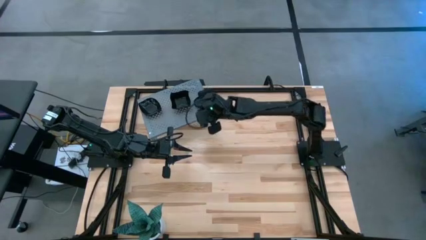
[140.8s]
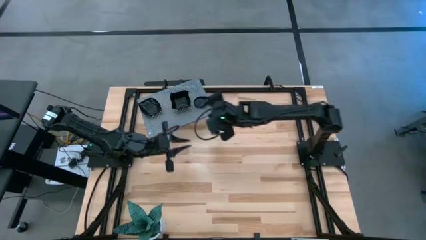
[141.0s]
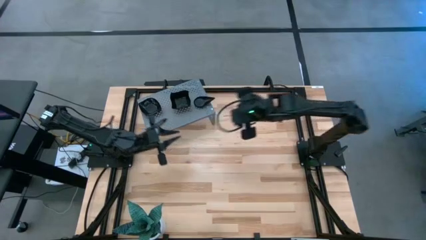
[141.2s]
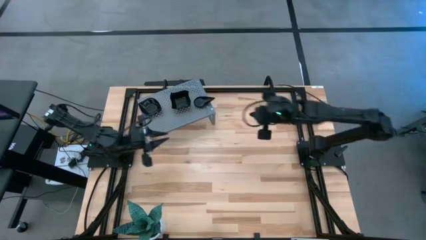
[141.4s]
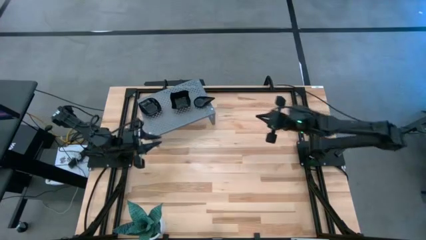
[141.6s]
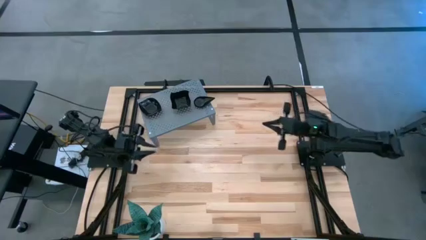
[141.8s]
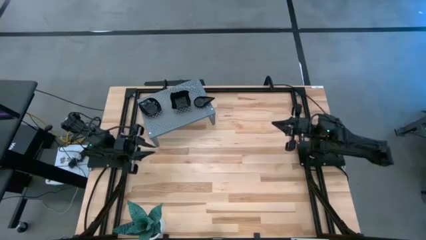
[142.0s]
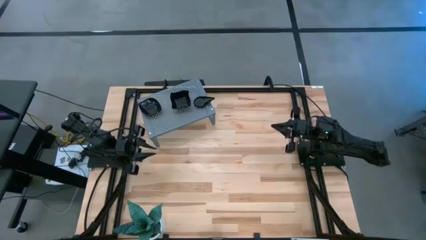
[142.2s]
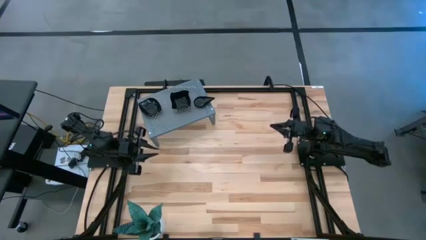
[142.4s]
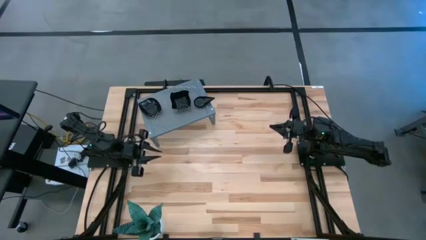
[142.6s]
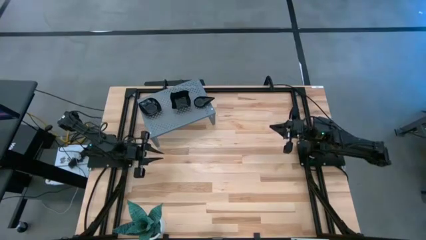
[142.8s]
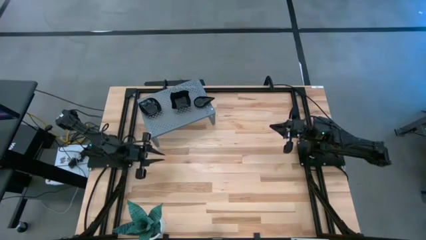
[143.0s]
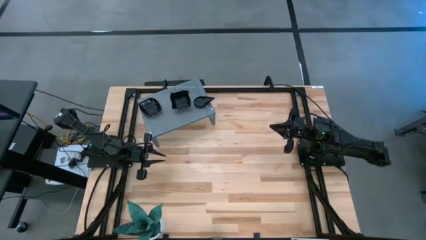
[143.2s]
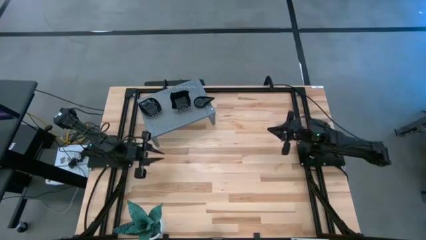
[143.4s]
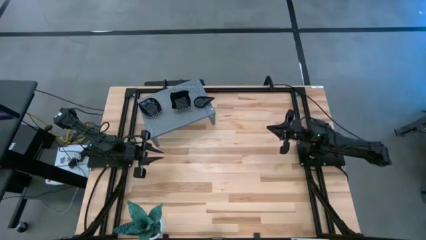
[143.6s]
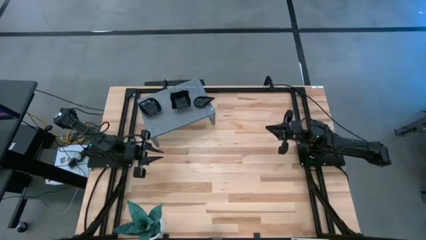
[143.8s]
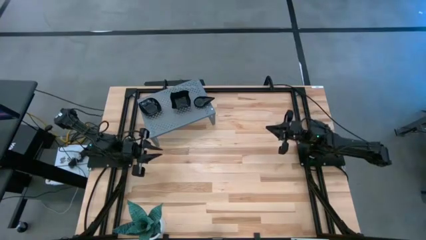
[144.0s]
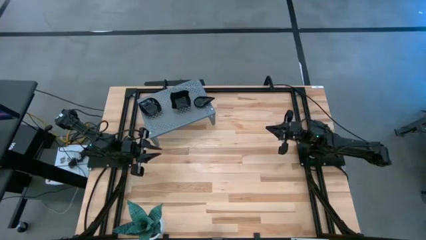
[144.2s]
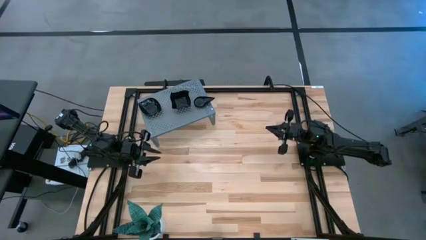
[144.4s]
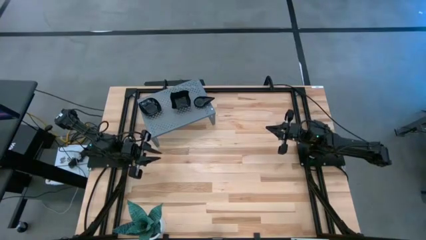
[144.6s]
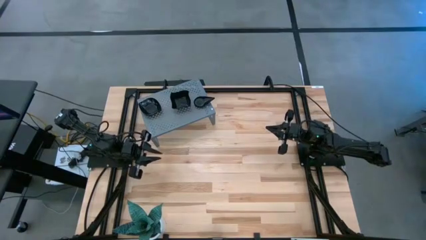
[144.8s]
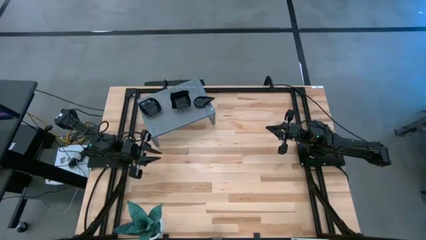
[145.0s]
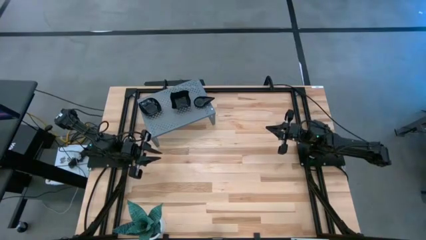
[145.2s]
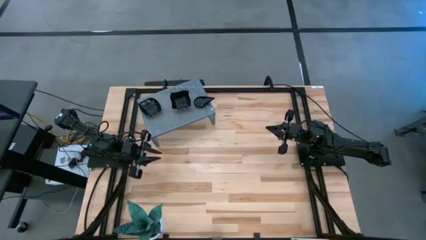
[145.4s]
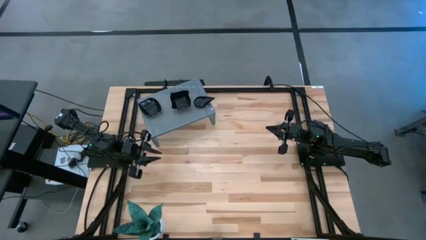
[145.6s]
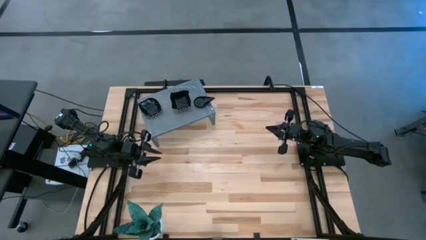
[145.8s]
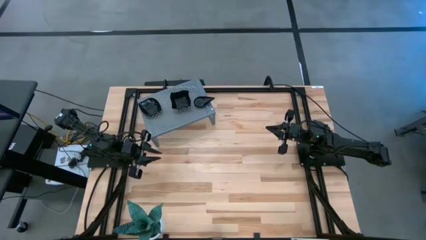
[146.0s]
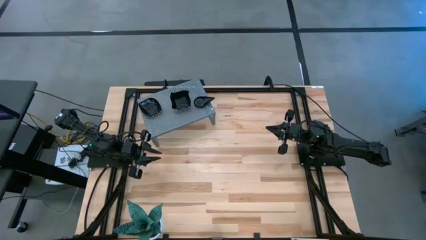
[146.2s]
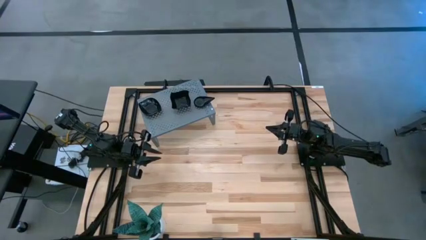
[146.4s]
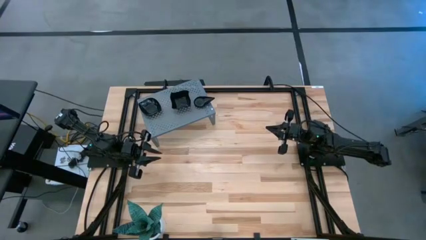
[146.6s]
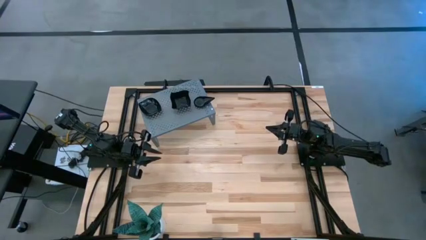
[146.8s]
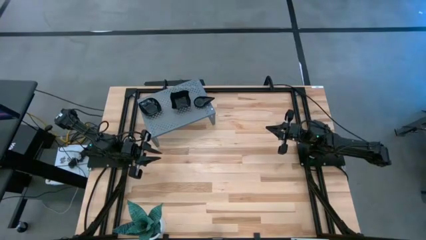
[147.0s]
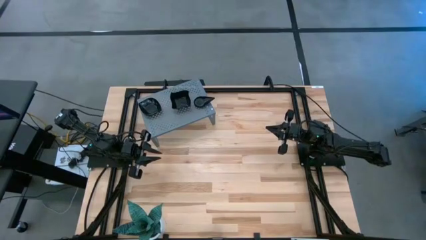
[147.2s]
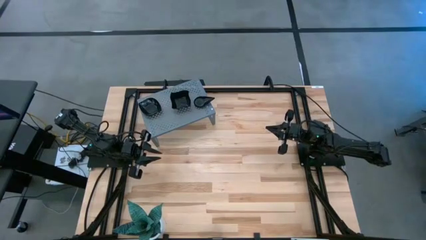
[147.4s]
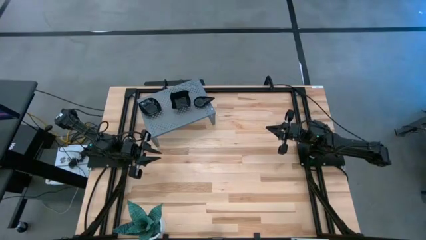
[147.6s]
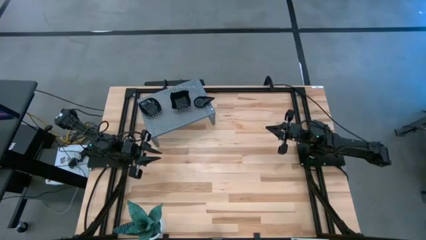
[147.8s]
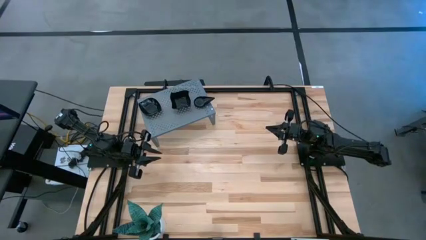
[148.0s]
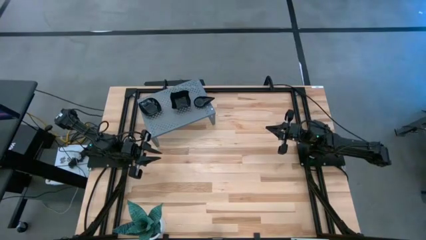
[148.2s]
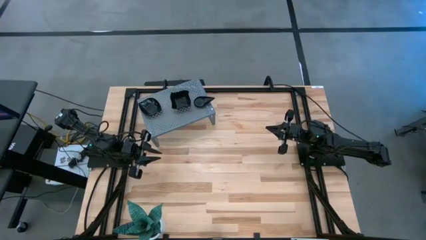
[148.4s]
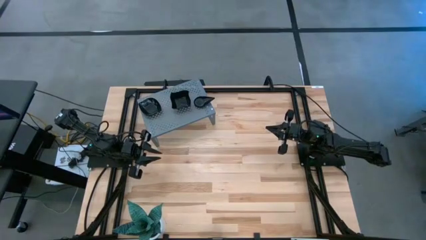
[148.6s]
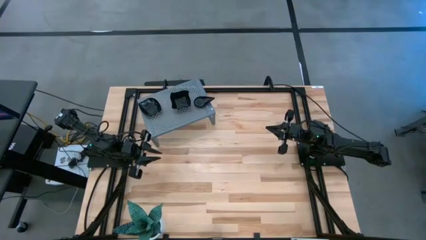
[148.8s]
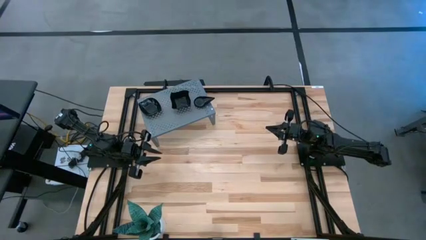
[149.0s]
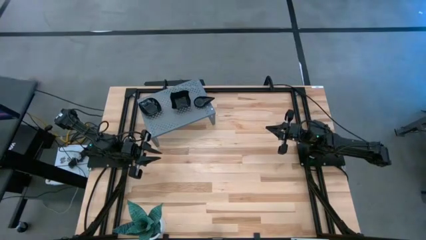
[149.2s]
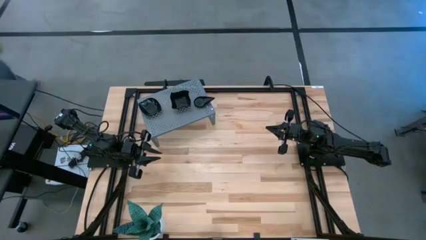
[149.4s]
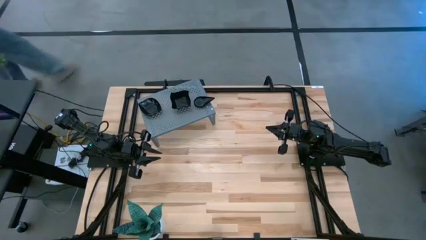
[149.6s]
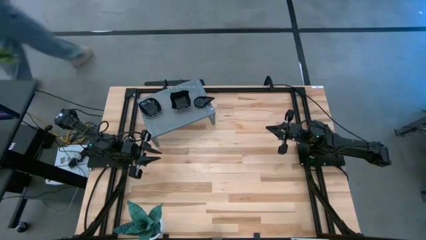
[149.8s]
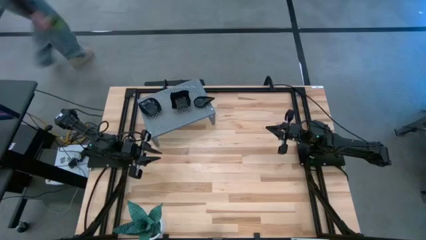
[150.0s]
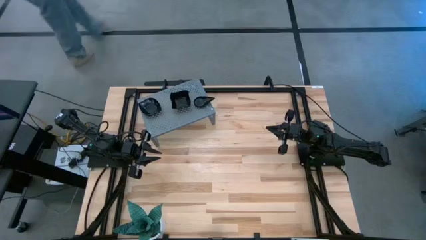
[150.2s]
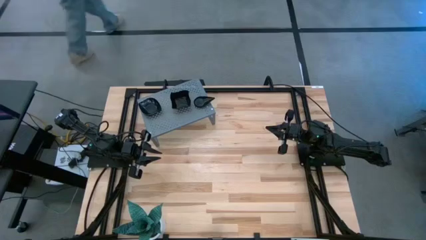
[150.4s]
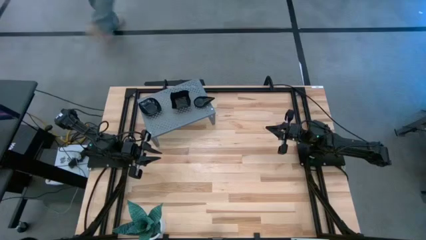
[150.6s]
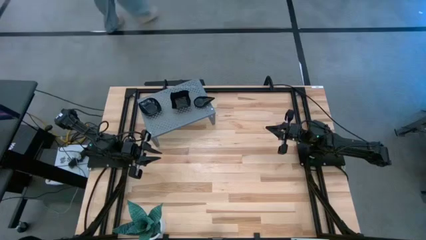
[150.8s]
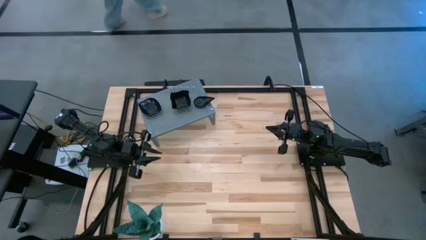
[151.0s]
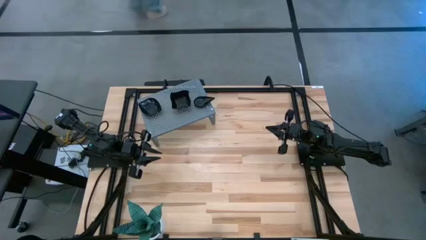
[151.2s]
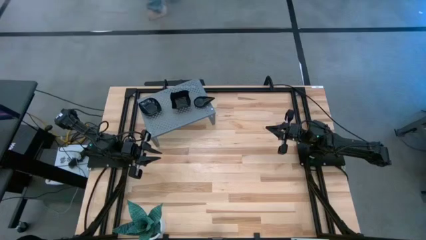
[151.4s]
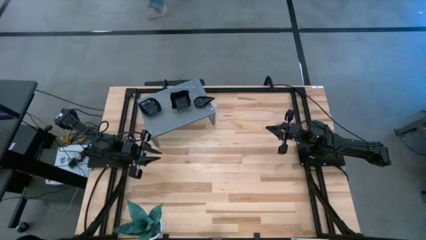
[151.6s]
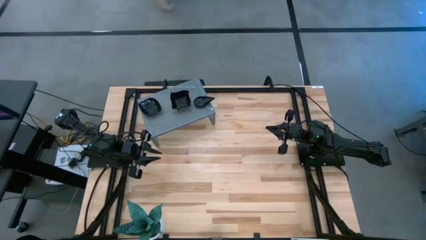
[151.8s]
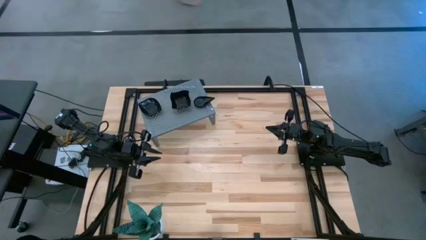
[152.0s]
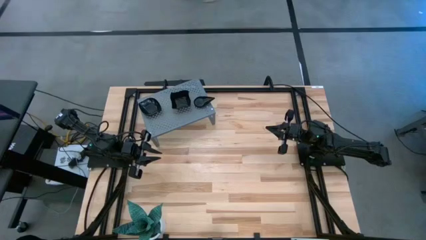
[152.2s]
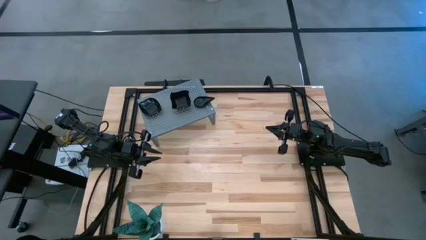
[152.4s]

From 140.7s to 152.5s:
Task: Pick & Place Mini shaped plates
Return to Home Position

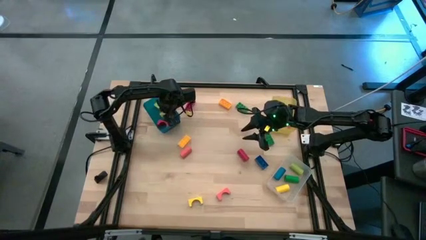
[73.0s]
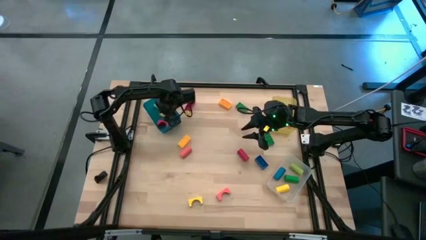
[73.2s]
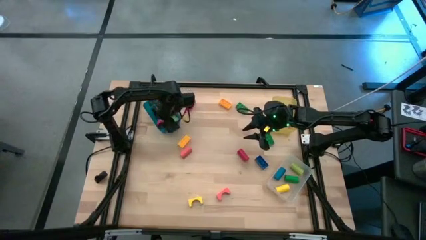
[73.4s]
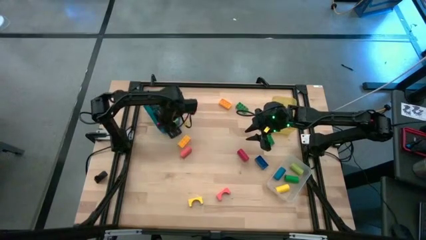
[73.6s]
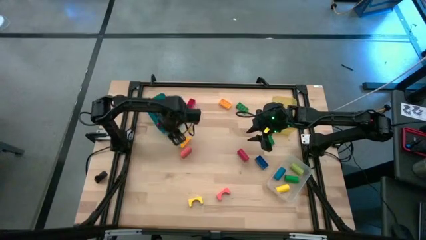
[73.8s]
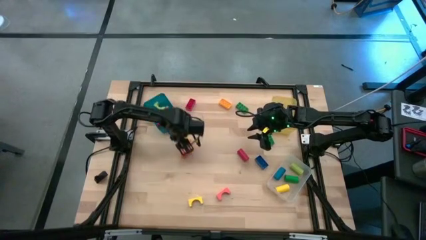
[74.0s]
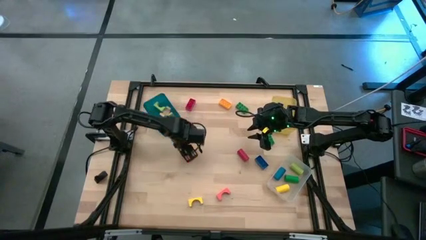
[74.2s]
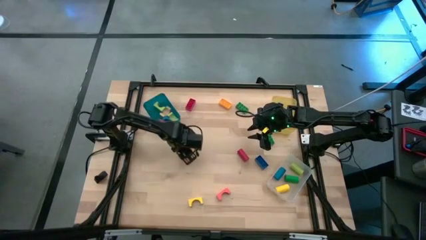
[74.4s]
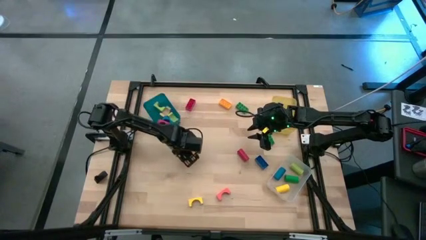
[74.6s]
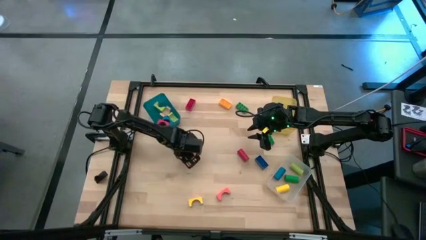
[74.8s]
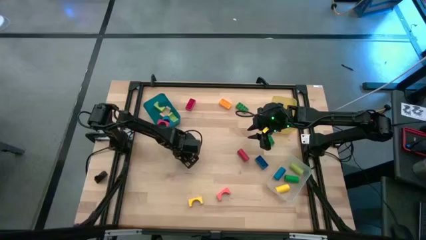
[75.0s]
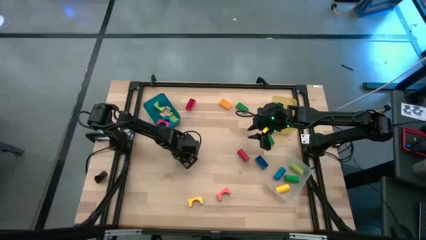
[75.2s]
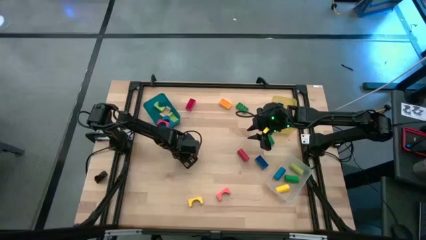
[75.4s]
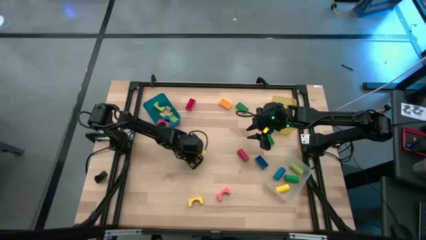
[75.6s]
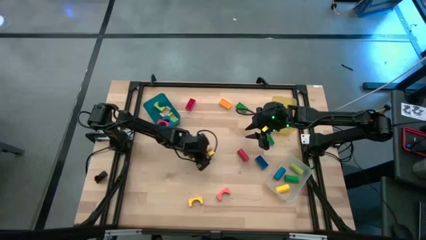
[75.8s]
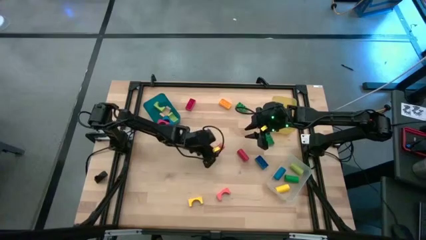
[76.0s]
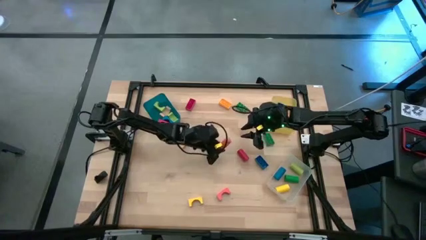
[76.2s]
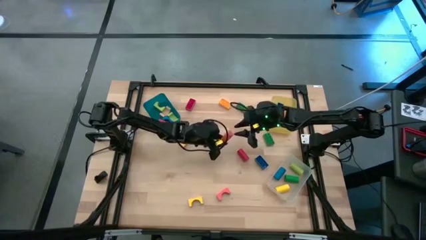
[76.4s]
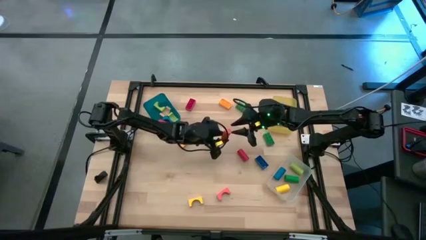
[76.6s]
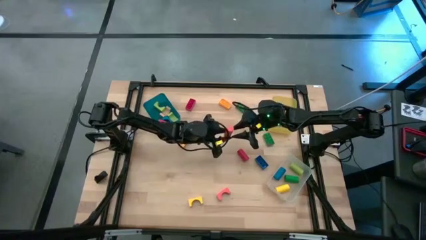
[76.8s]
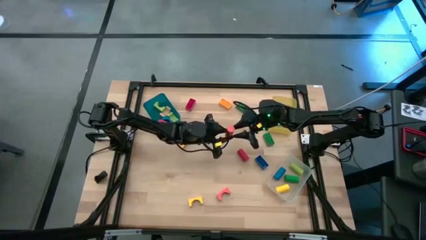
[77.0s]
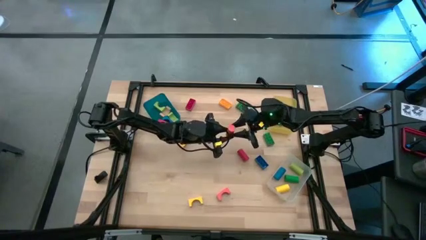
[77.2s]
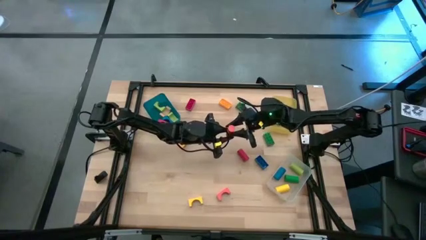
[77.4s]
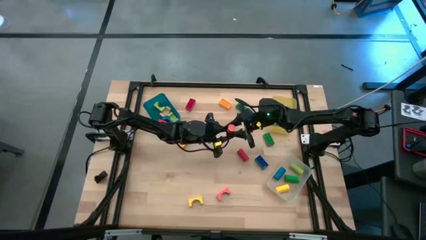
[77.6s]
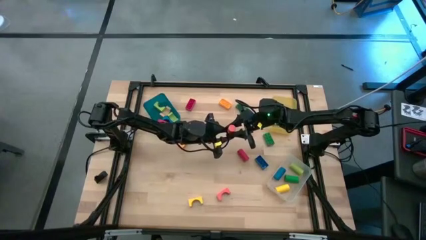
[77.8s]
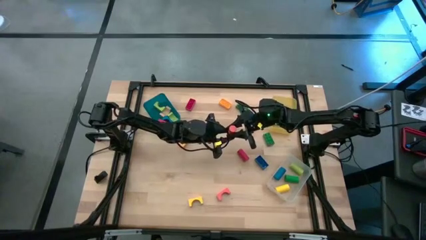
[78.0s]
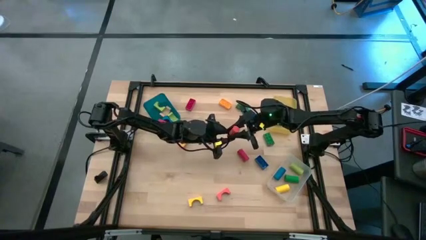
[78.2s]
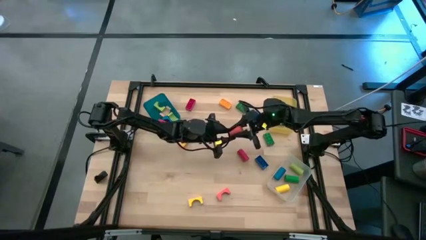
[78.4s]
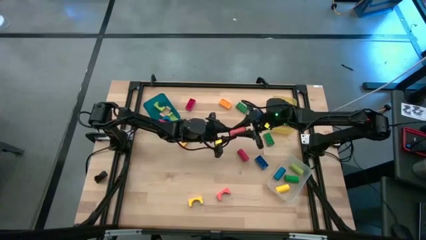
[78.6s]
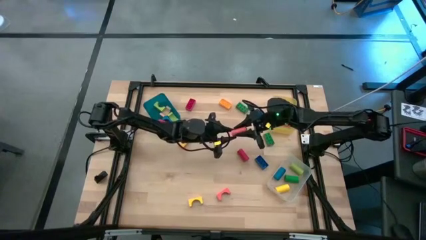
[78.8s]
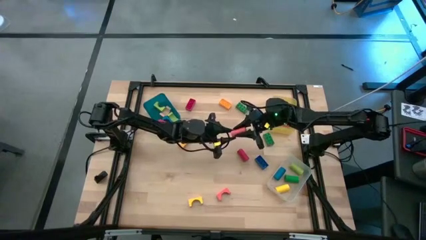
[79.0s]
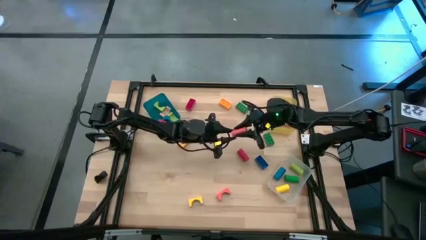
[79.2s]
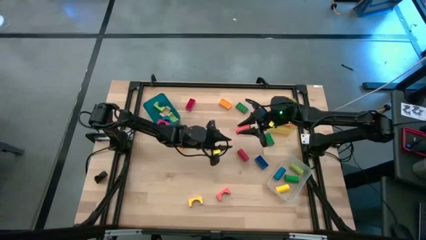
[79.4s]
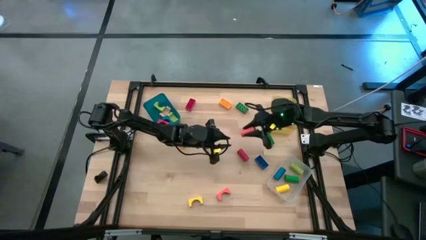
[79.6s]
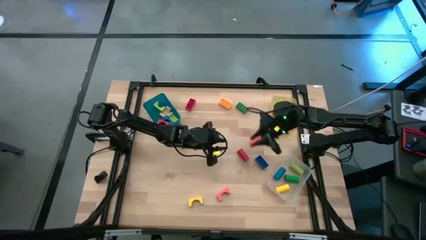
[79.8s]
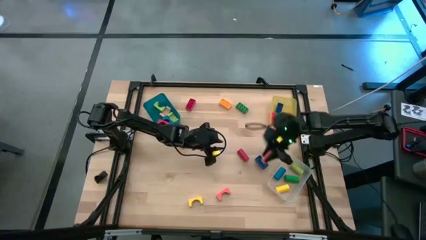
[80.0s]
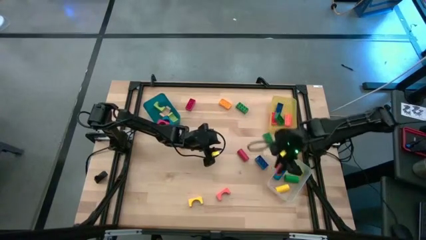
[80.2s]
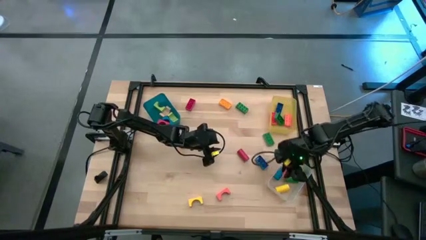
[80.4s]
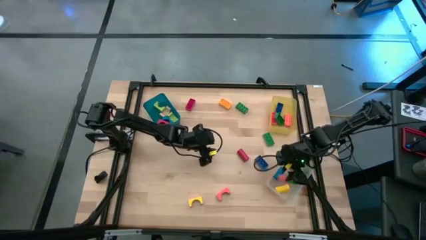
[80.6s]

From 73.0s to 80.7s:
Task: Sort blocks by size
Put the orange cylindrical block into the transparent bin
